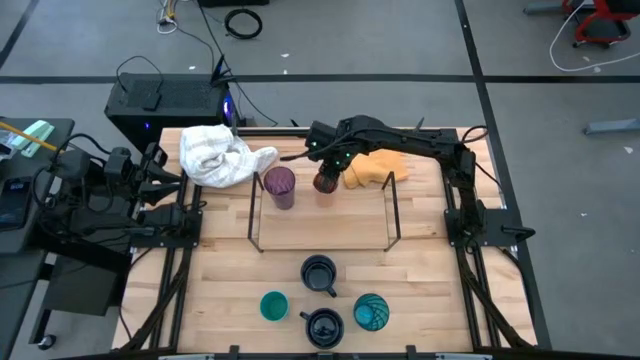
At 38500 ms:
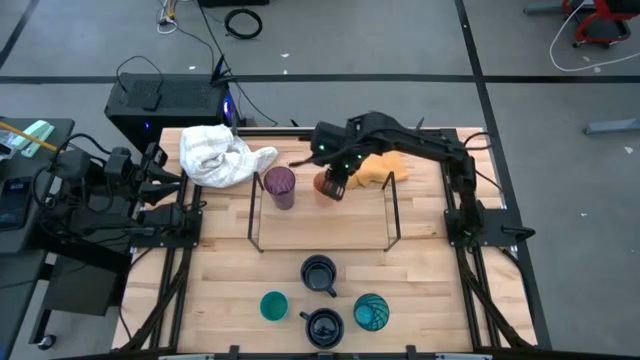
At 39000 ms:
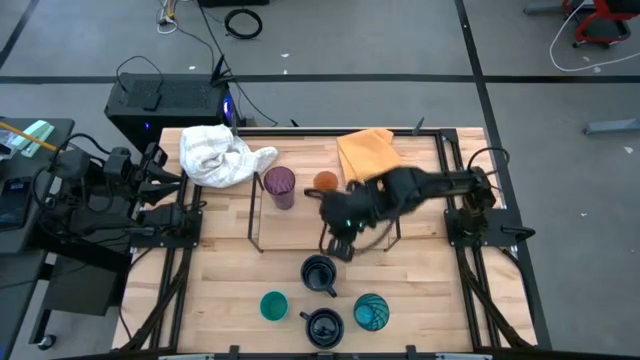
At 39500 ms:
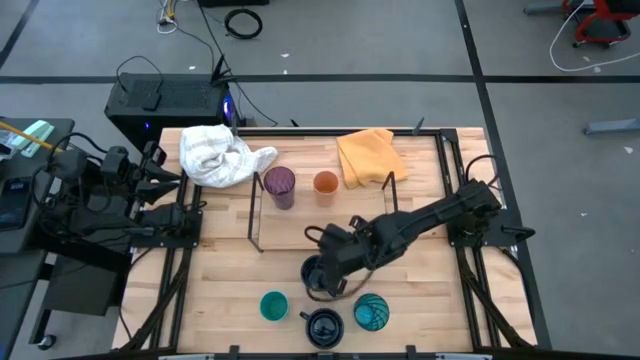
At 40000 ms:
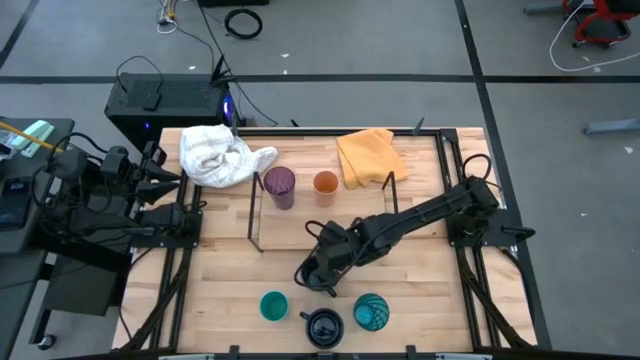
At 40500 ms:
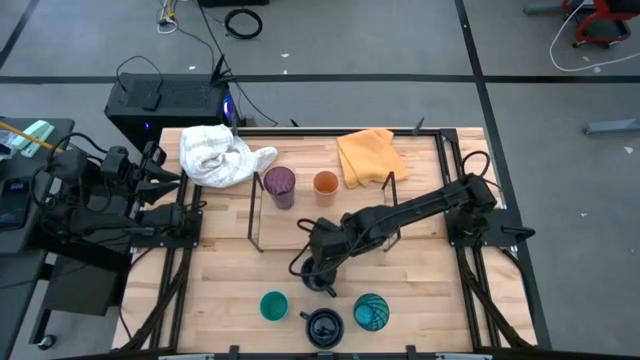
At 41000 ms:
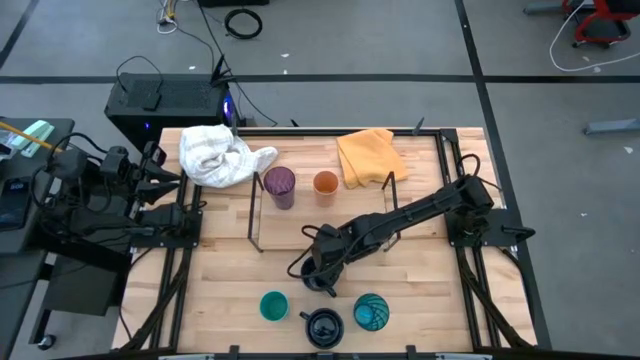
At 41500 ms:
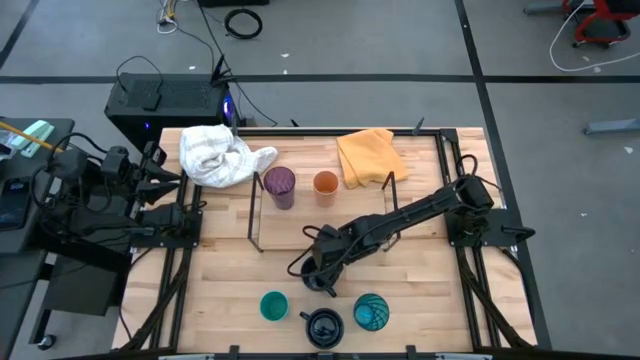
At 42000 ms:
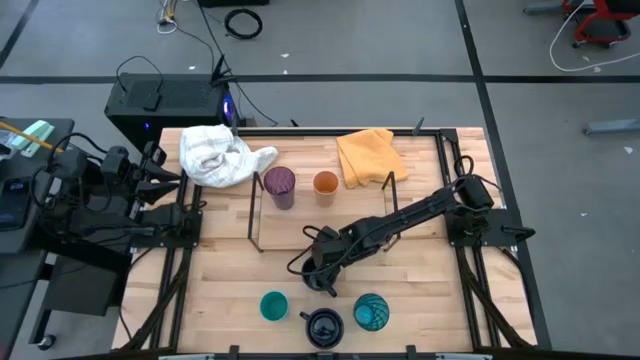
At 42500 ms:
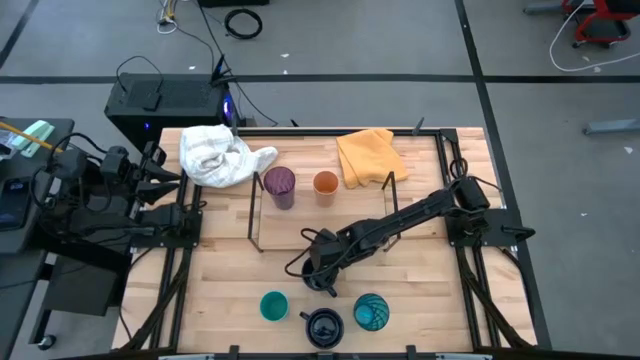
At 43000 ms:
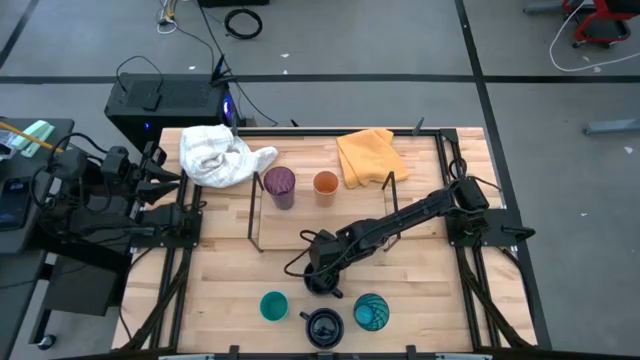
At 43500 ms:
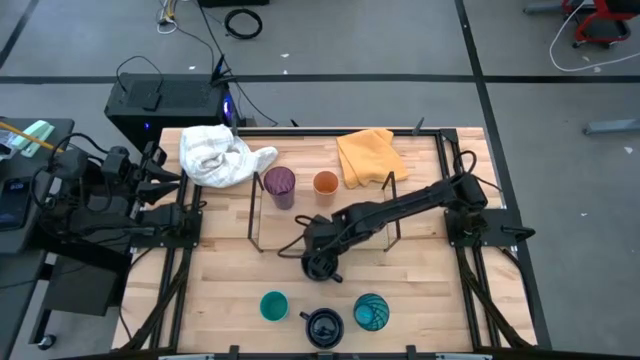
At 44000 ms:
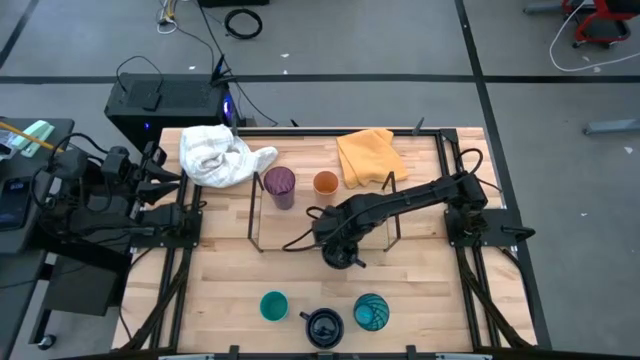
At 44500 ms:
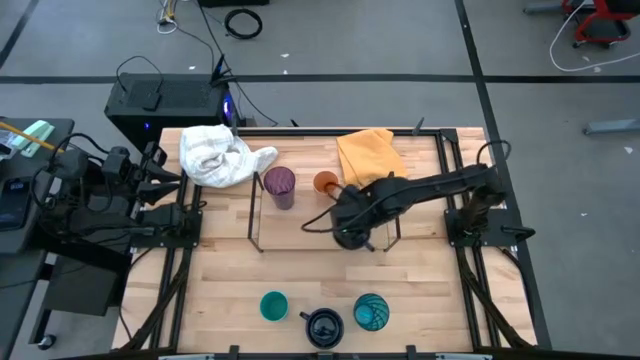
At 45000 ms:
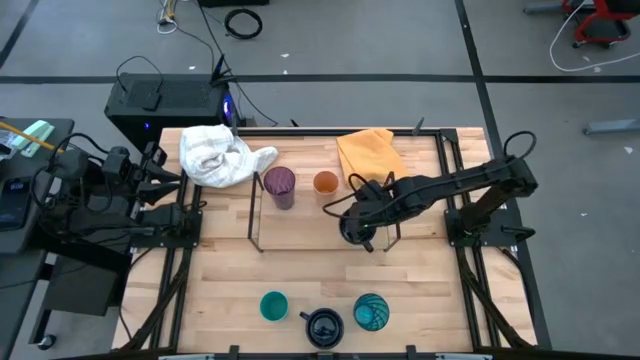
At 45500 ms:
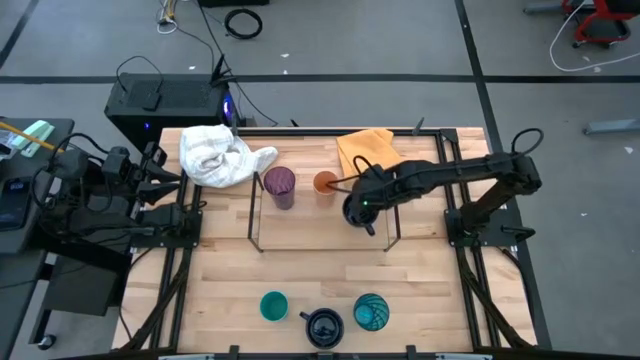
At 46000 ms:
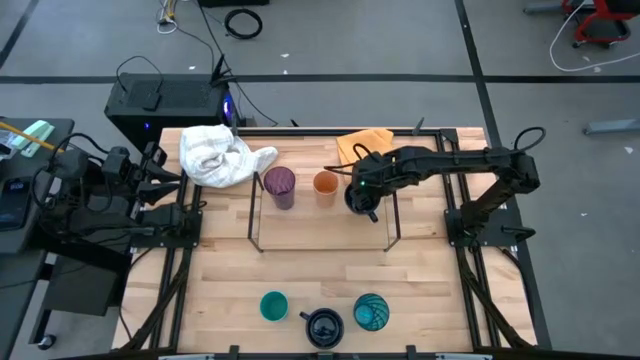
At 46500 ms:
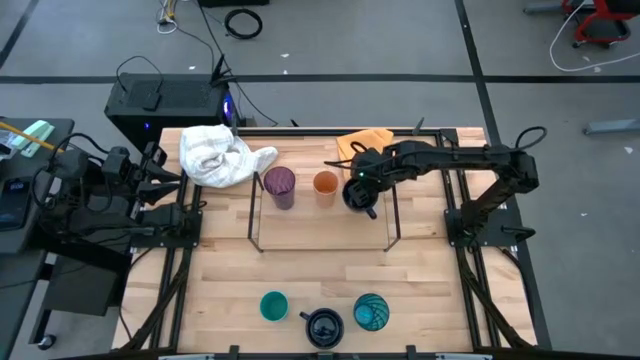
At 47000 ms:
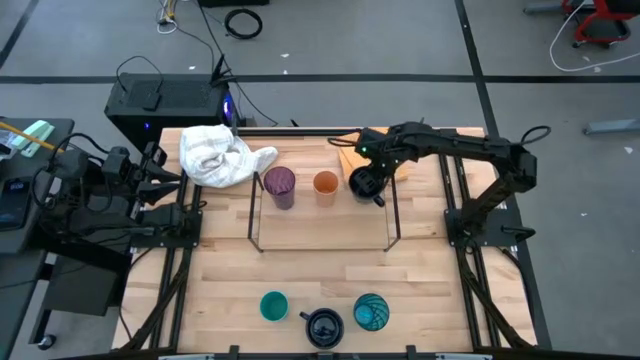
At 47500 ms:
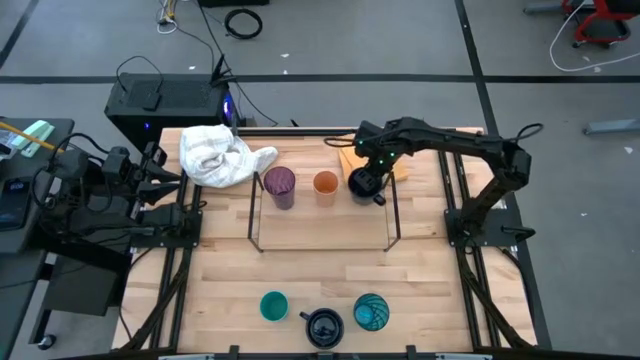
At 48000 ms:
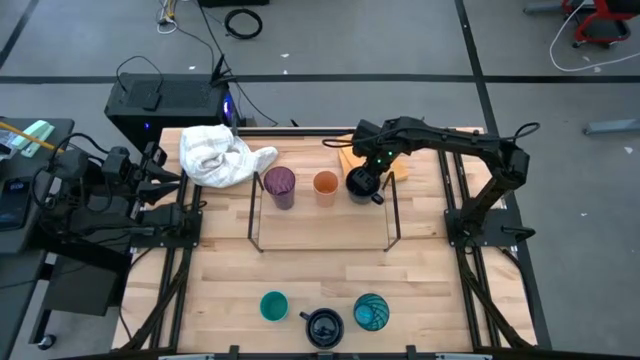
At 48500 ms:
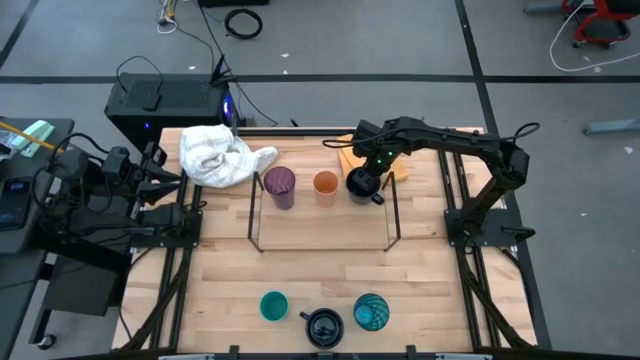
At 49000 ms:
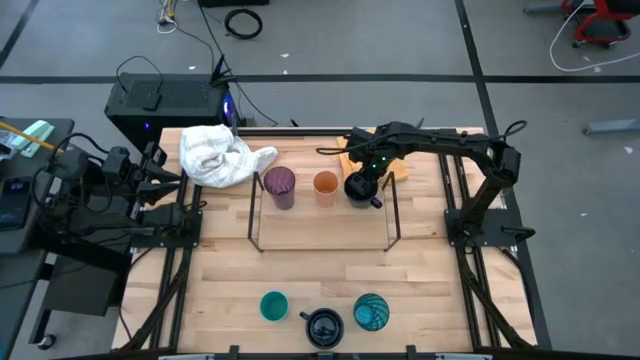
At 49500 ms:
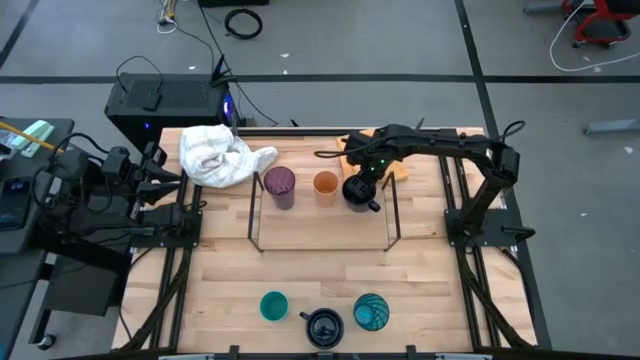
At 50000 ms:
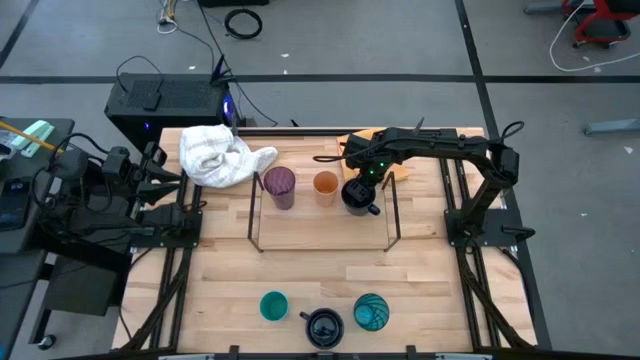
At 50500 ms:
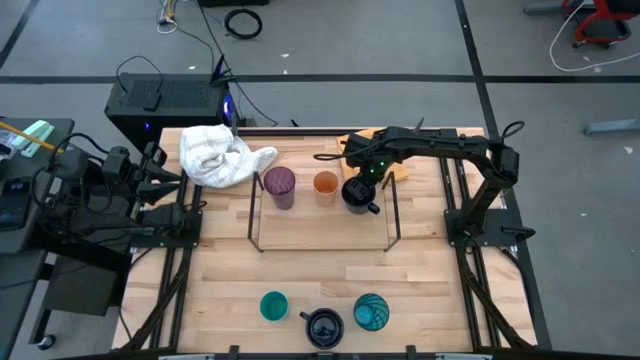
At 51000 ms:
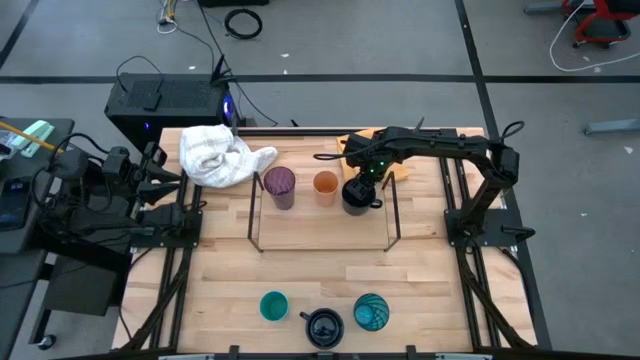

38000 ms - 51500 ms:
Task: Stack small to large cups/mugs on shelf
Put the top blue mug on the shelf

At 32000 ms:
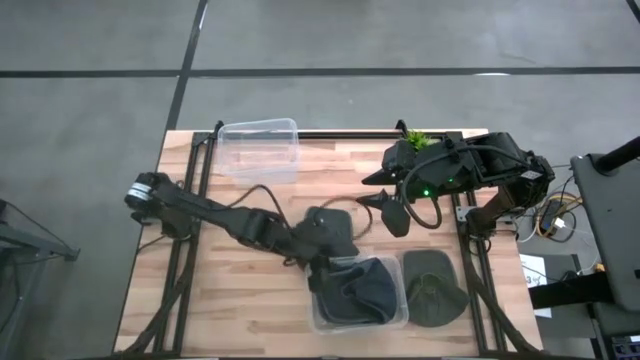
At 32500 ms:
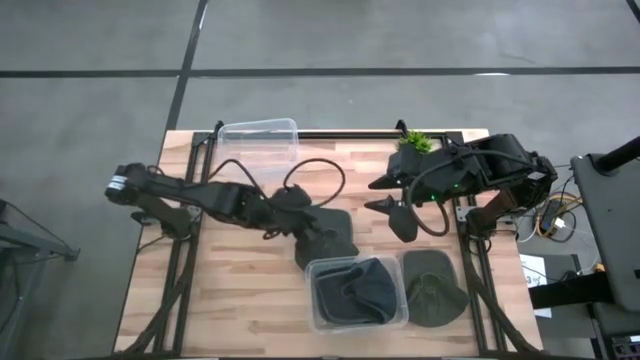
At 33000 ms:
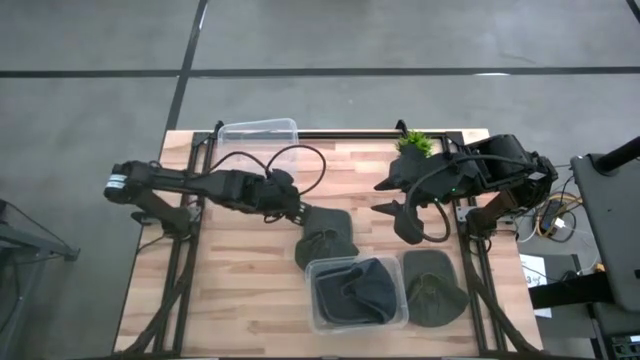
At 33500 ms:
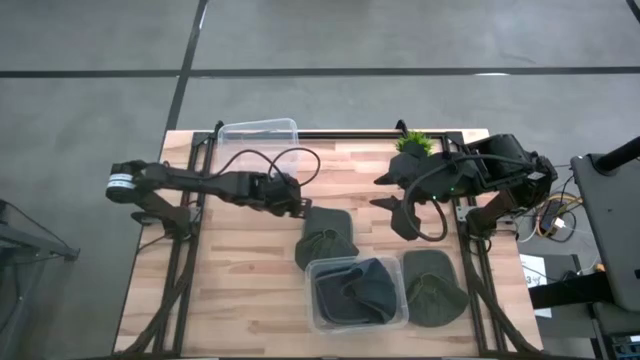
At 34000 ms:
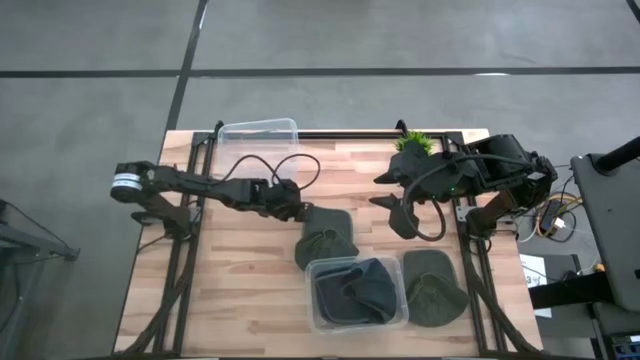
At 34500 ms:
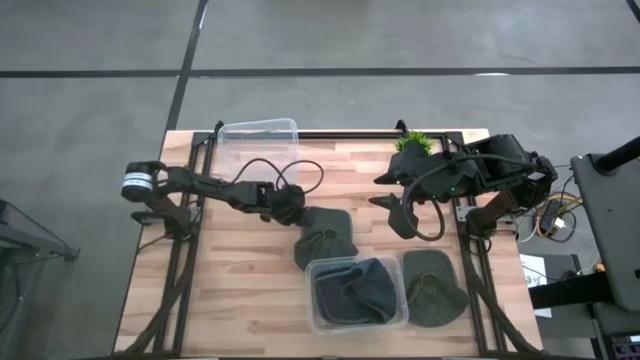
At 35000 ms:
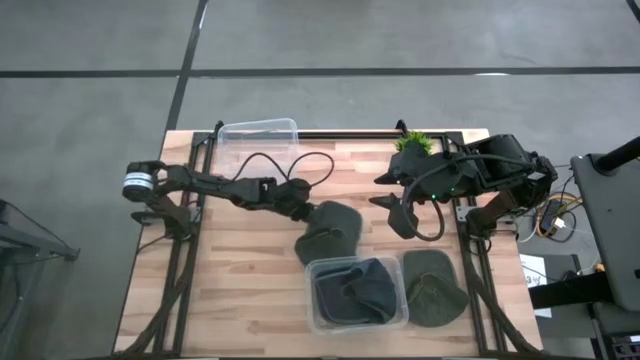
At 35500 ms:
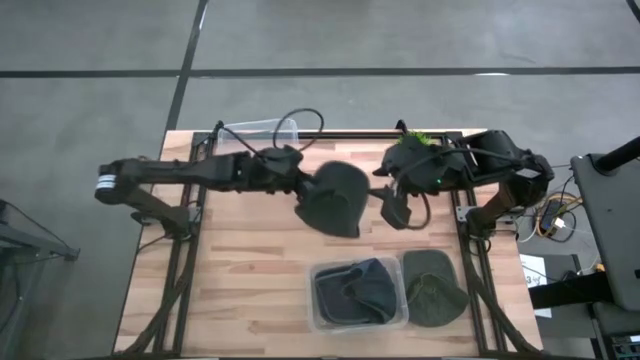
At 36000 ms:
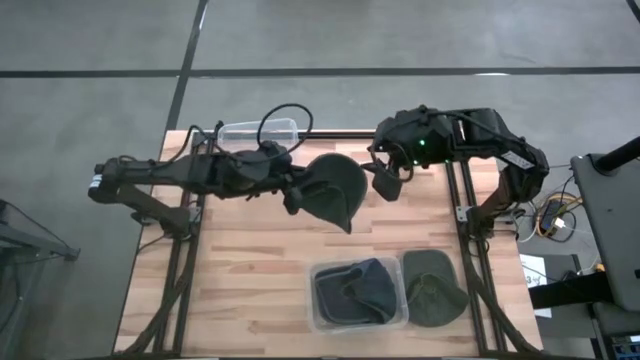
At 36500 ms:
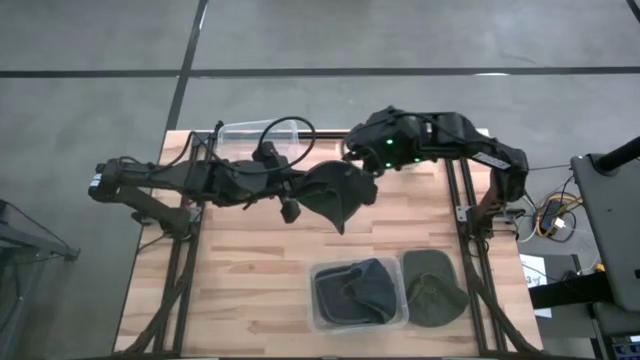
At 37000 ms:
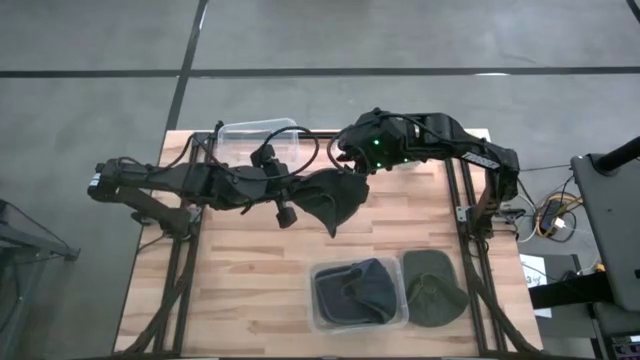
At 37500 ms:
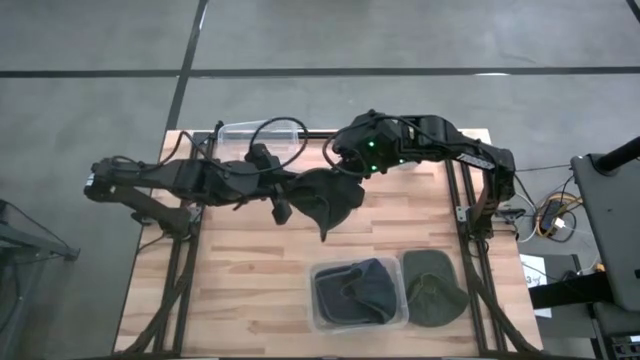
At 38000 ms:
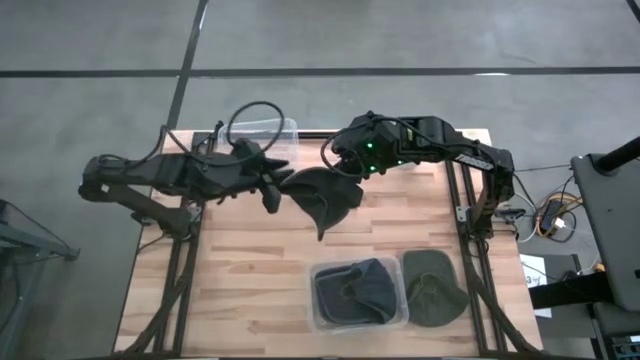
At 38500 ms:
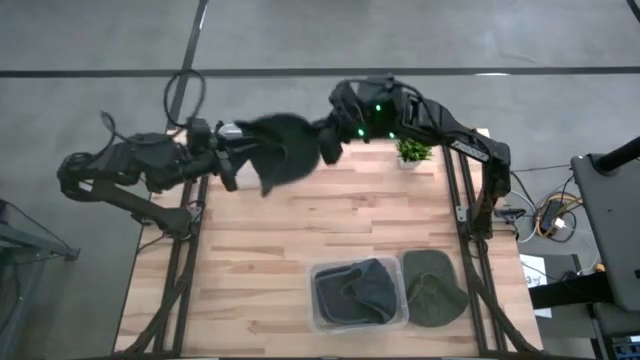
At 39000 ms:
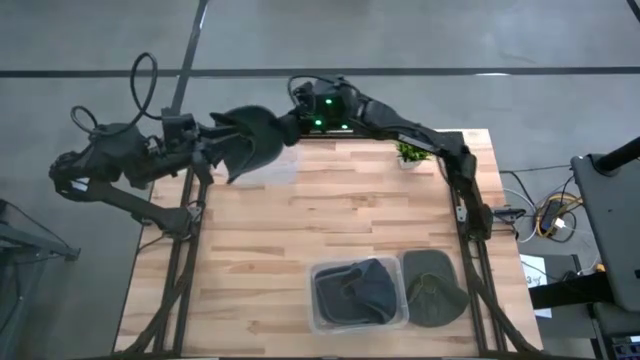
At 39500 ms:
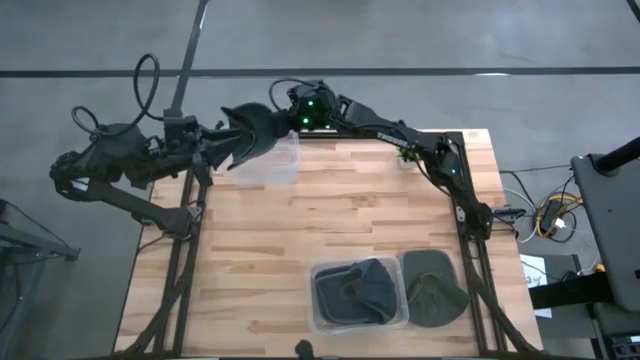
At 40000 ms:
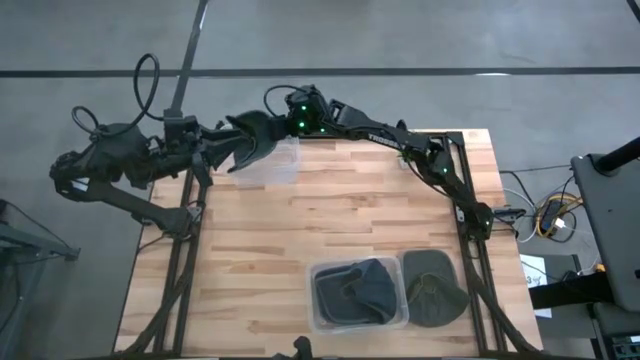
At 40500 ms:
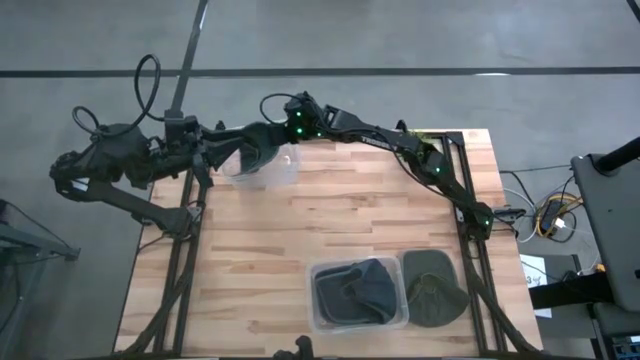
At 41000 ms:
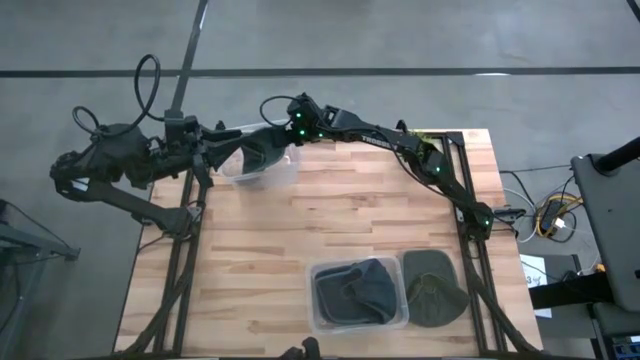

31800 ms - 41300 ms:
Task: Pick & Place hat
Put the top black cap into the top transparent bin
